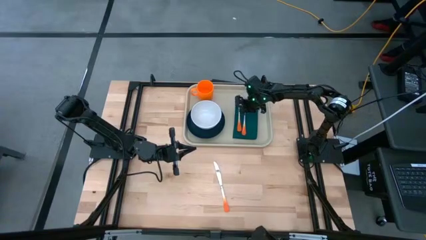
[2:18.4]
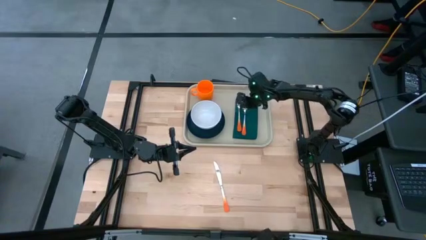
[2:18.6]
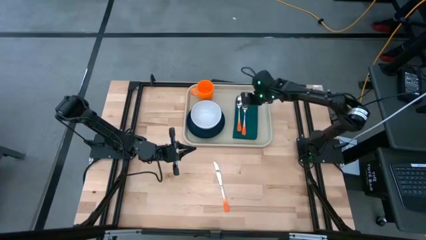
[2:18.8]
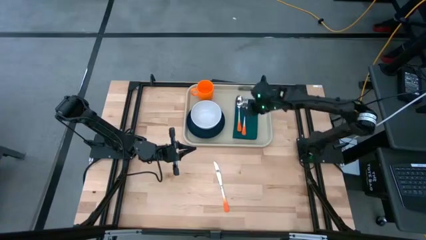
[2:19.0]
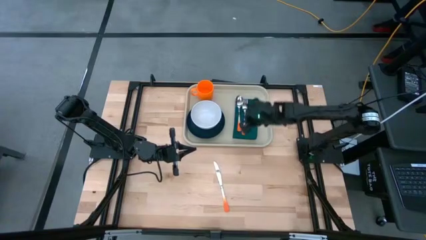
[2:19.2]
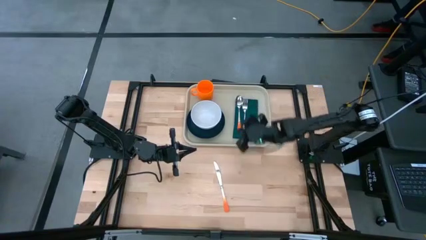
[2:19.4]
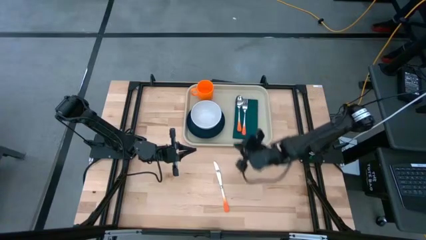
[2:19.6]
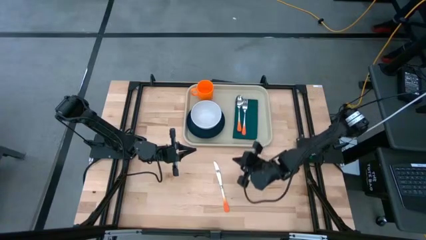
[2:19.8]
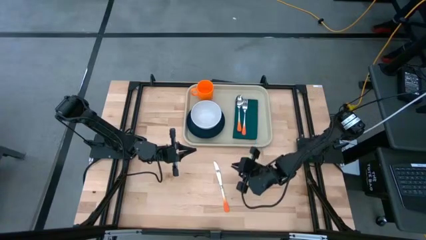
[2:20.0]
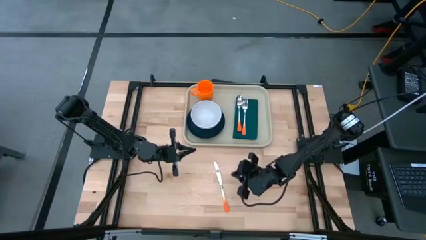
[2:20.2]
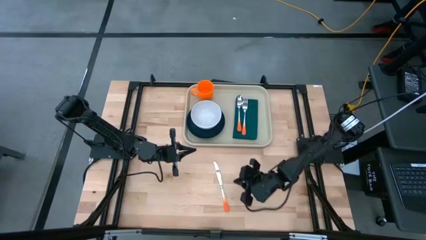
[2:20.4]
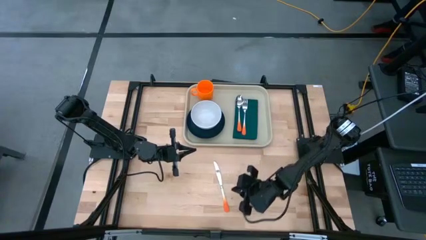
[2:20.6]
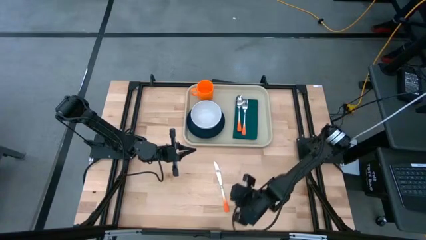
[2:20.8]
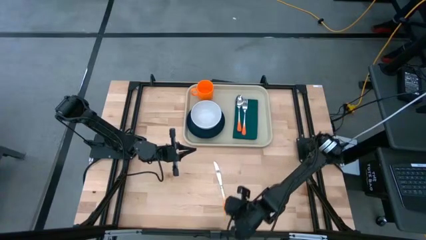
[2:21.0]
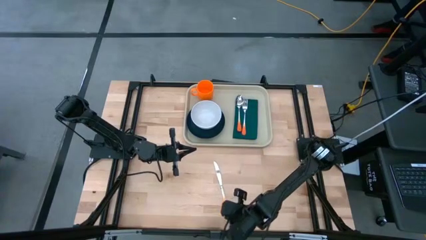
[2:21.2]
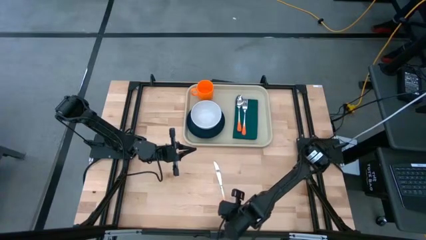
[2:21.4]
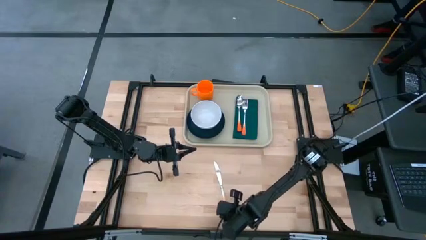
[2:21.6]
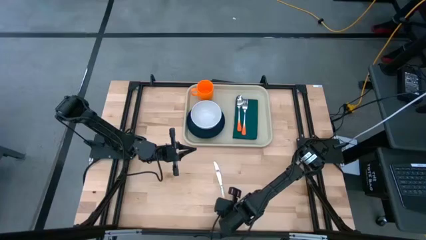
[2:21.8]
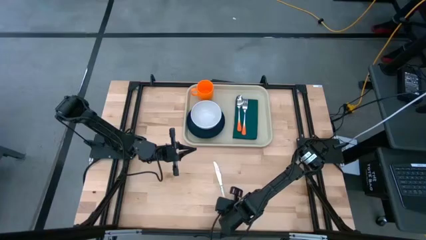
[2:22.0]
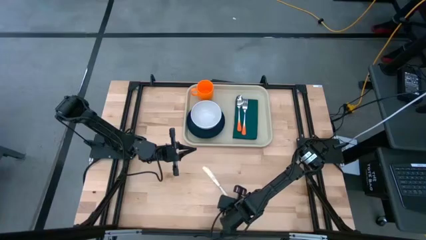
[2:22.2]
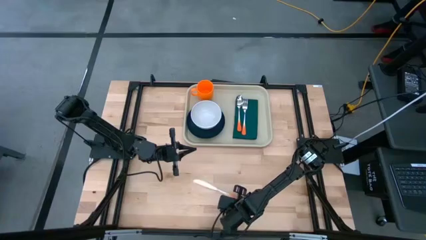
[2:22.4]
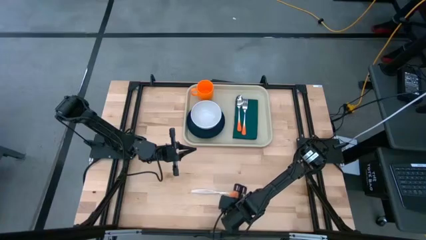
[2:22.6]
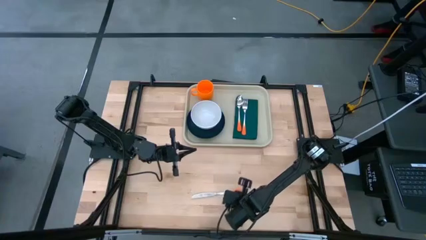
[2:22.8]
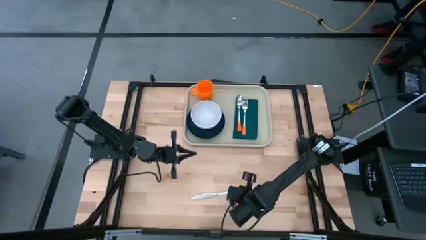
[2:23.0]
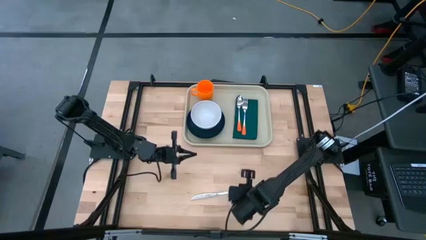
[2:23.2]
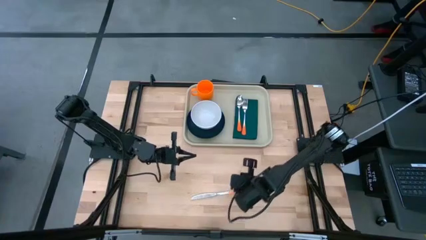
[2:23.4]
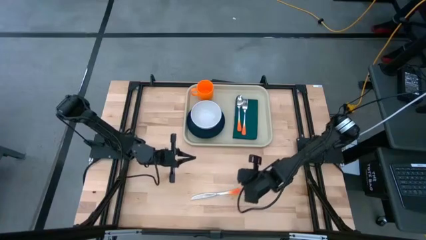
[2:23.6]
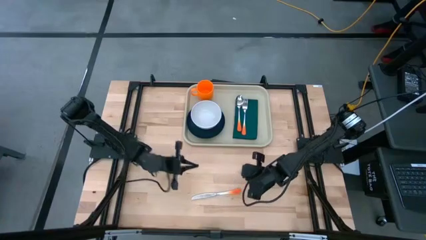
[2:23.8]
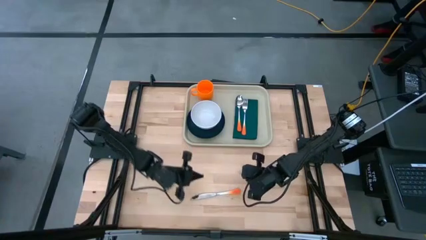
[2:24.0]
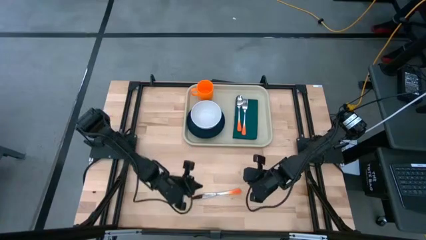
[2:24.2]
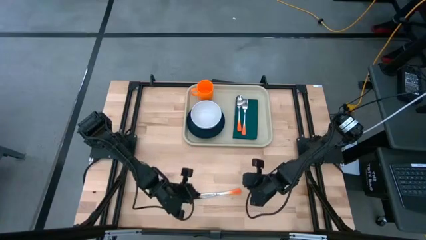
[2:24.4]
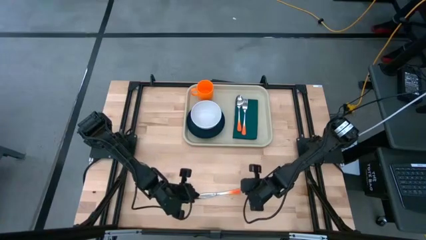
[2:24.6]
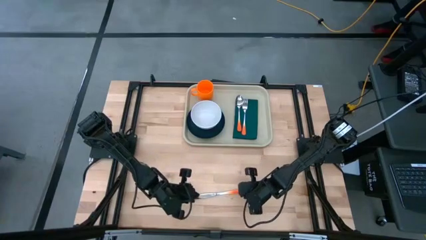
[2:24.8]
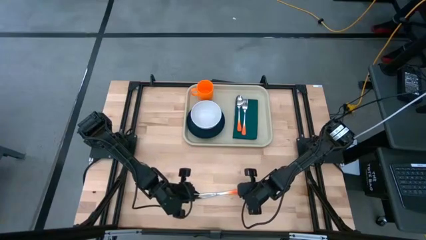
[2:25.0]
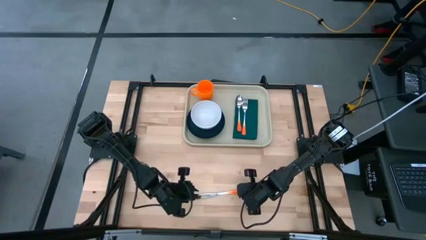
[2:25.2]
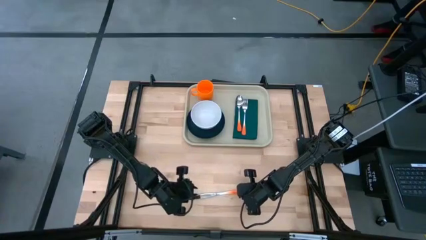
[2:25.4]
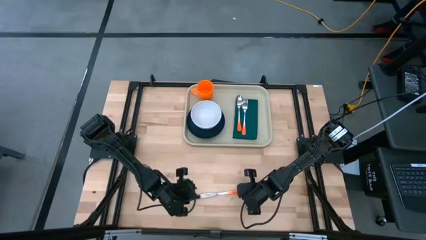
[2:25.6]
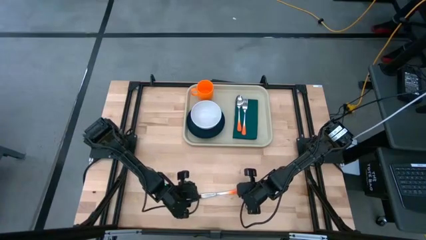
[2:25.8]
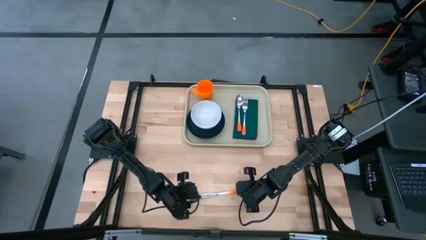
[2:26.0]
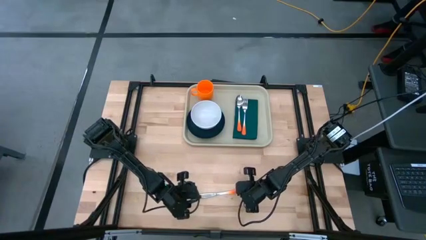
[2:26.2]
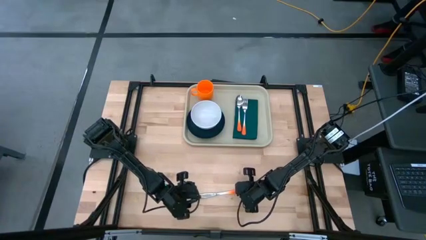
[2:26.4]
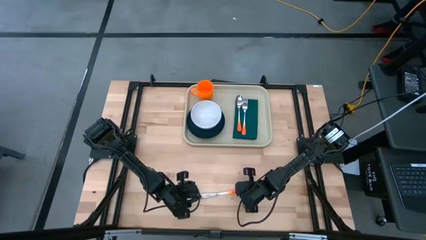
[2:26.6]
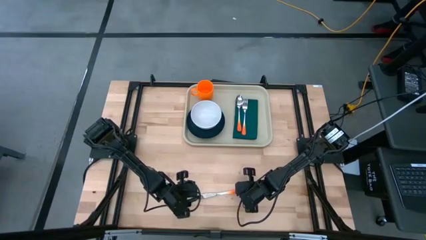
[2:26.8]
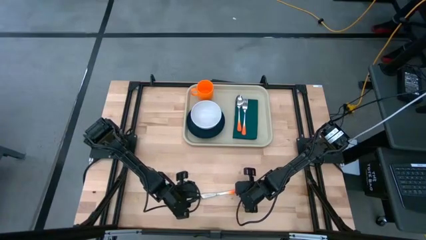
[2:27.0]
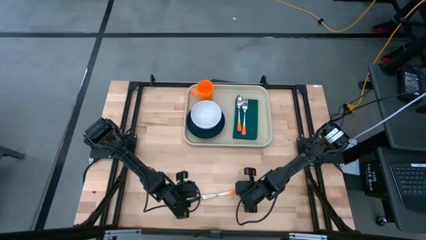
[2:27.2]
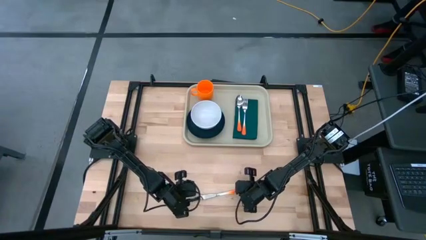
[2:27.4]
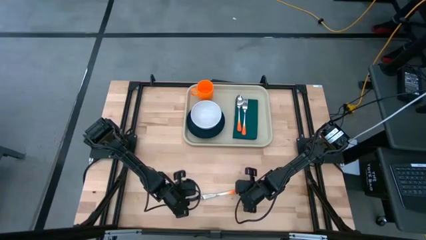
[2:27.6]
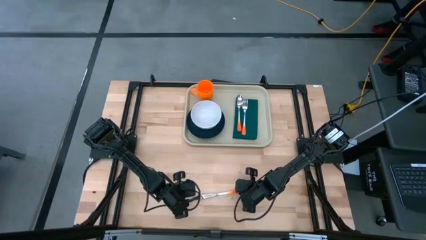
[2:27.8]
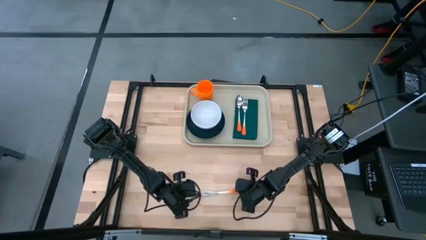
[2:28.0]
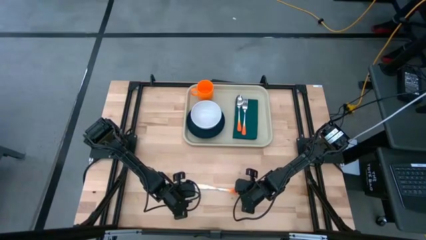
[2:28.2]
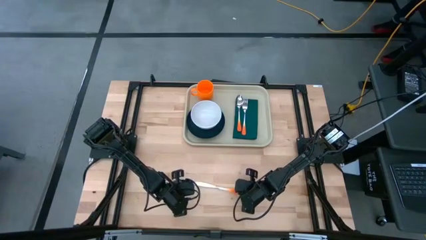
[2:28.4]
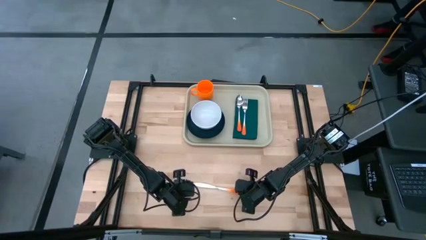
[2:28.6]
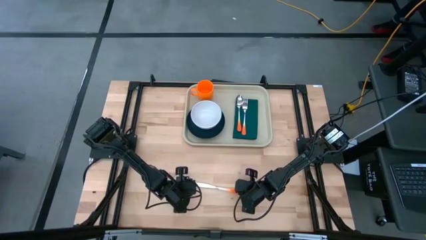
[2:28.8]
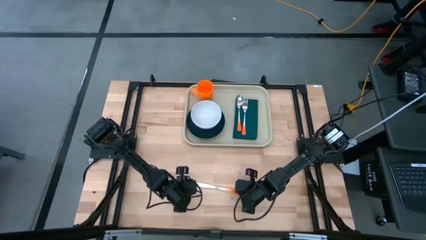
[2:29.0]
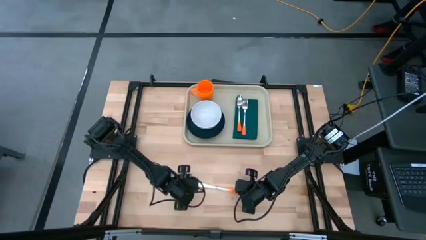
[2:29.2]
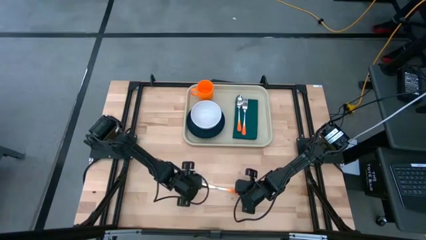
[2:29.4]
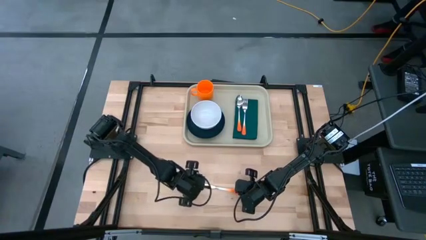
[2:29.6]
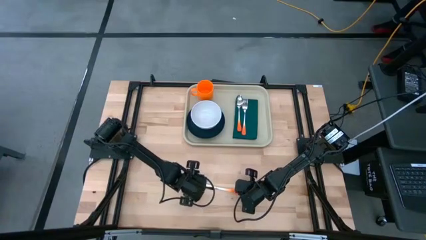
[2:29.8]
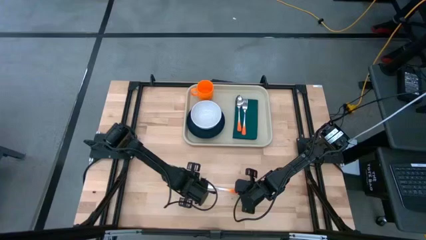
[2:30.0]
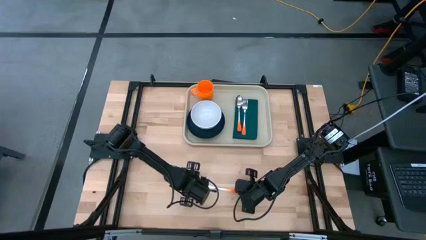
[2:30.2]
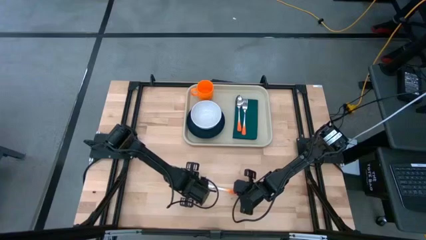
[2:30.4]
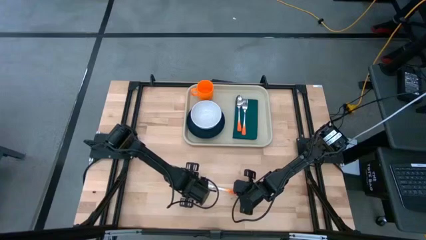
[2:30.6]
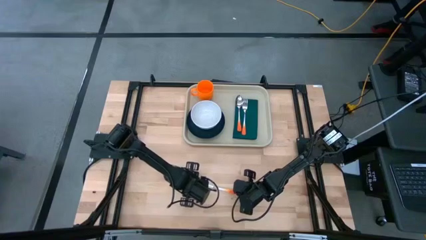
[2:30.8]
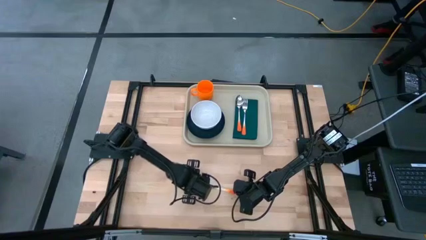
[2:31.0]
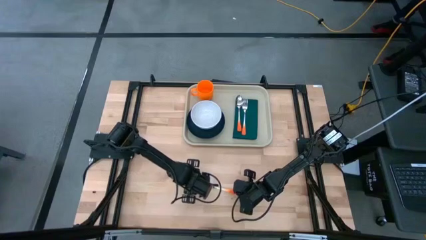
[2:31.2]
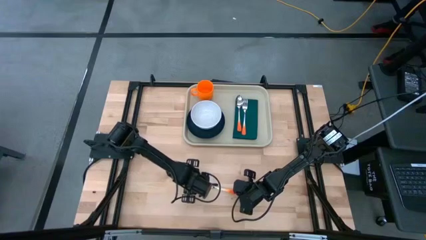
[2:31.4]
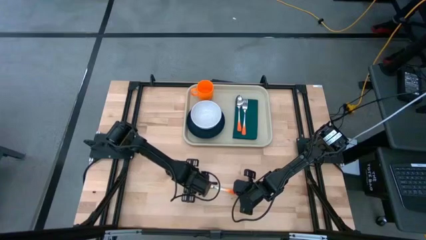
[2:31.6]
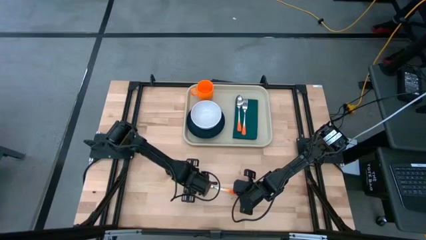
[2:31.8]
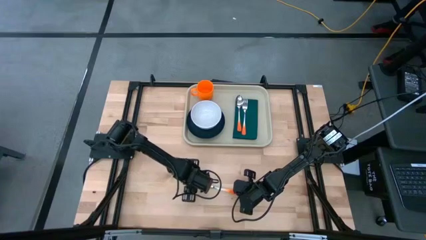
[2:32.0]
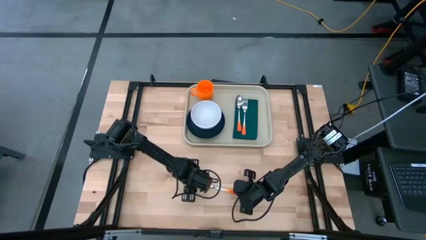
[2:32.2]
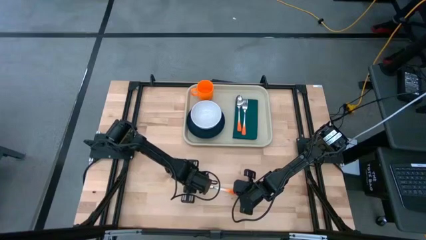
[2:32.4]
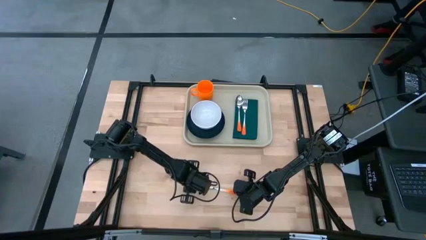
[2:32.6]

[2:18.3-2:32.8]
Task: Set up tray
Put the orange knife on top of the green napkin to the right of the orange fork on the gray serving tray
